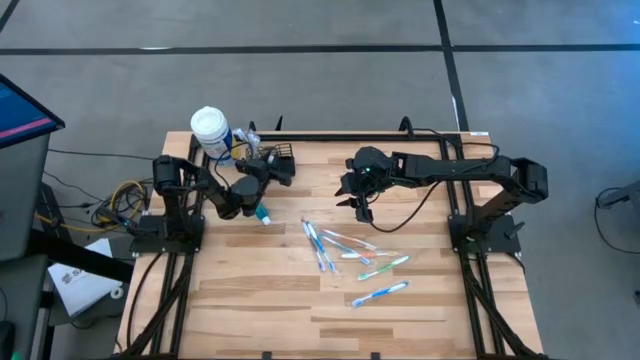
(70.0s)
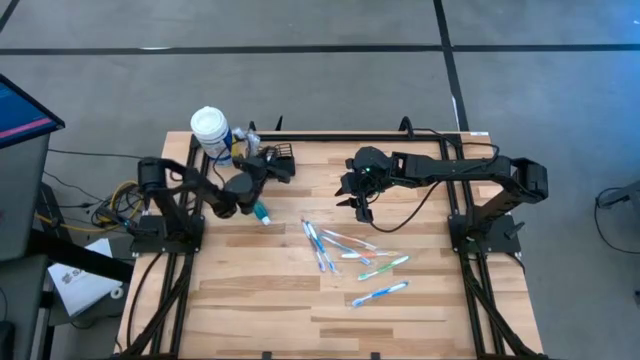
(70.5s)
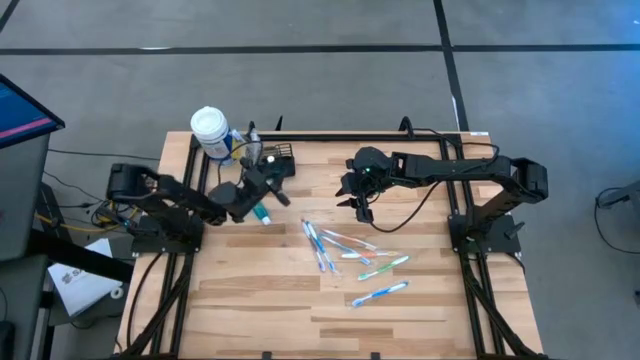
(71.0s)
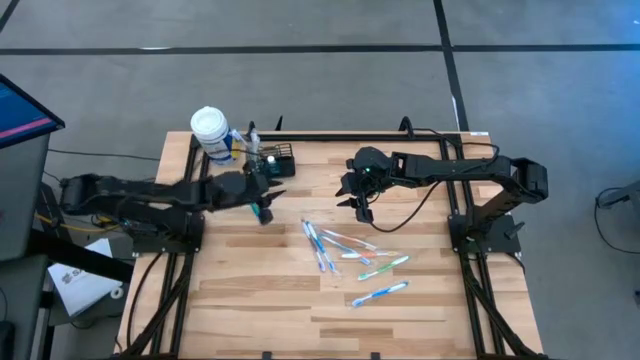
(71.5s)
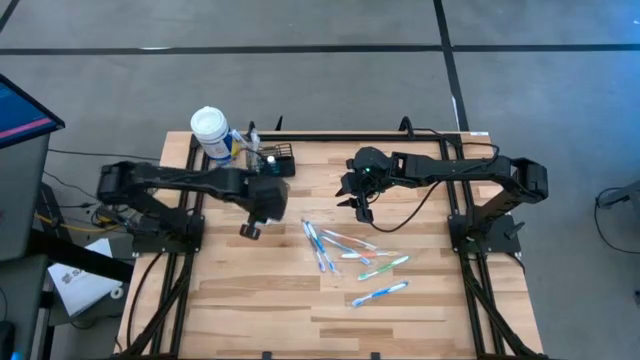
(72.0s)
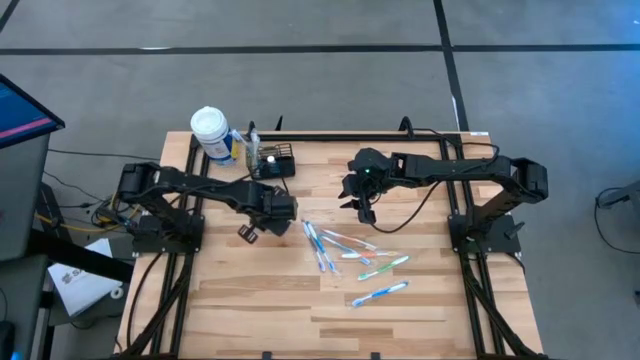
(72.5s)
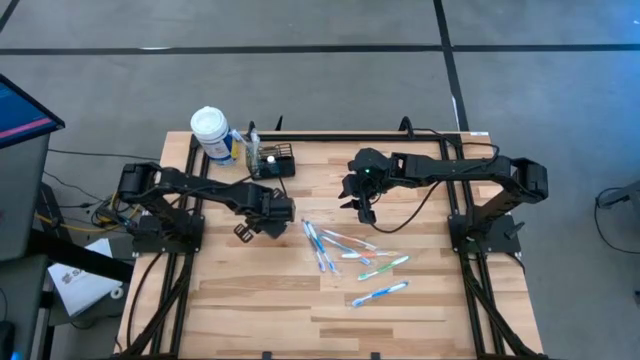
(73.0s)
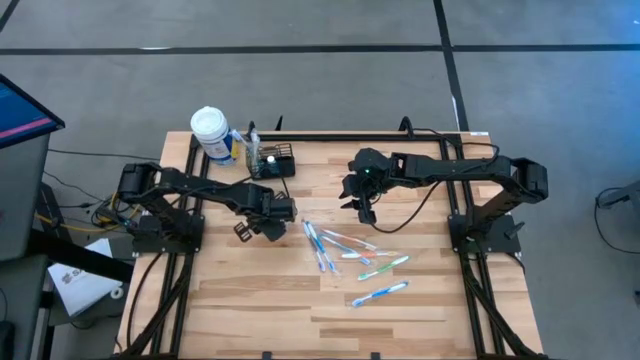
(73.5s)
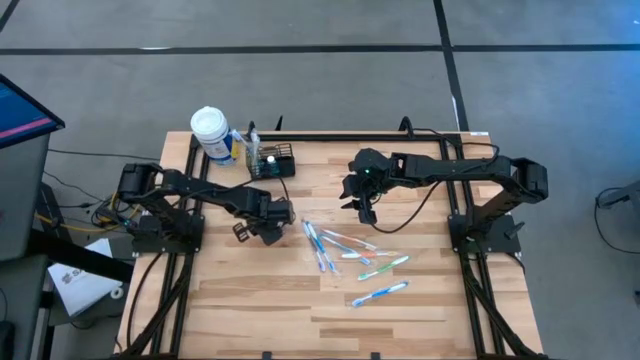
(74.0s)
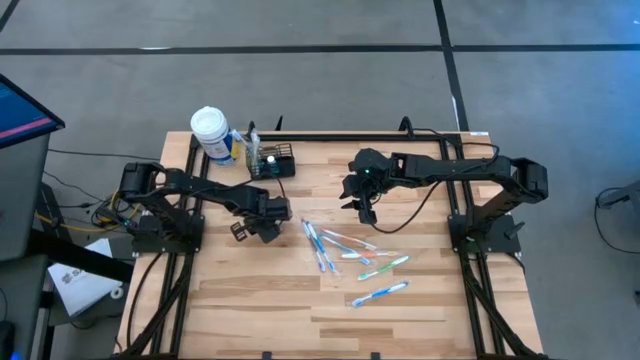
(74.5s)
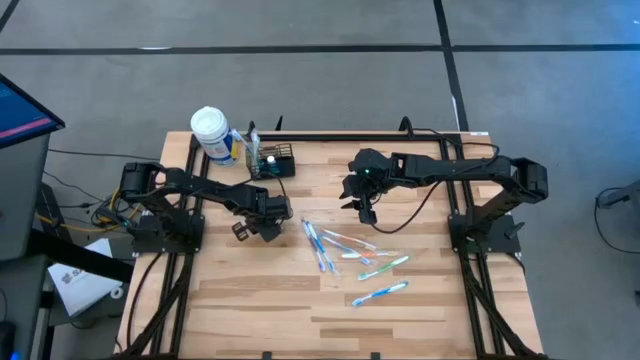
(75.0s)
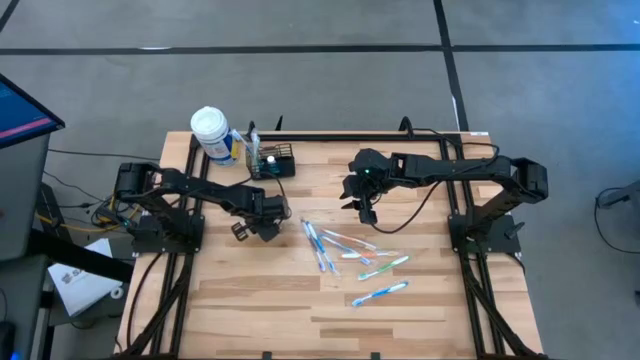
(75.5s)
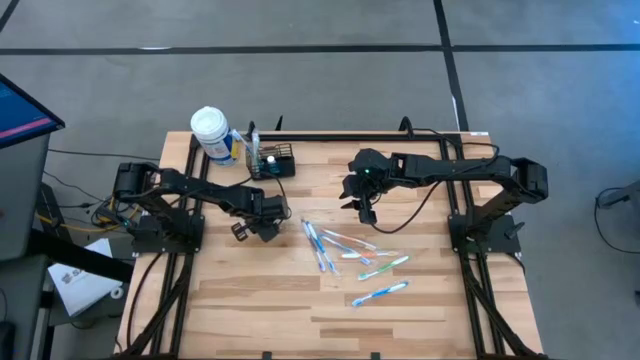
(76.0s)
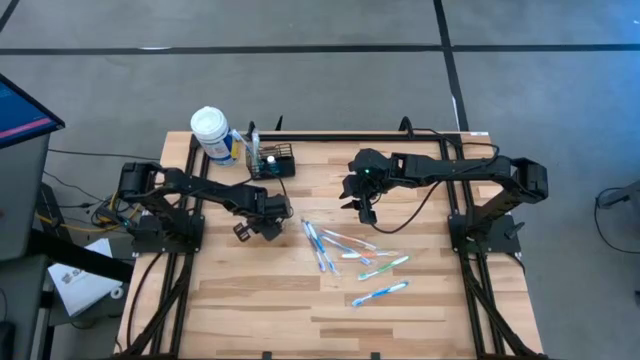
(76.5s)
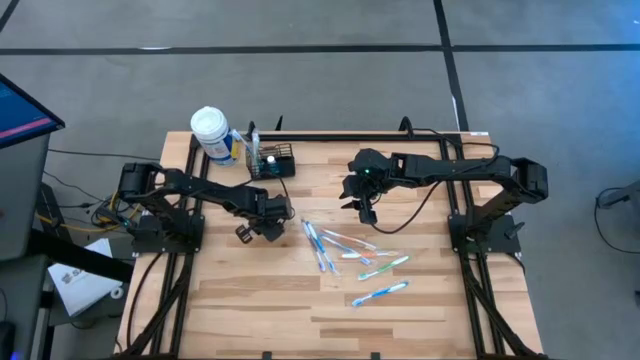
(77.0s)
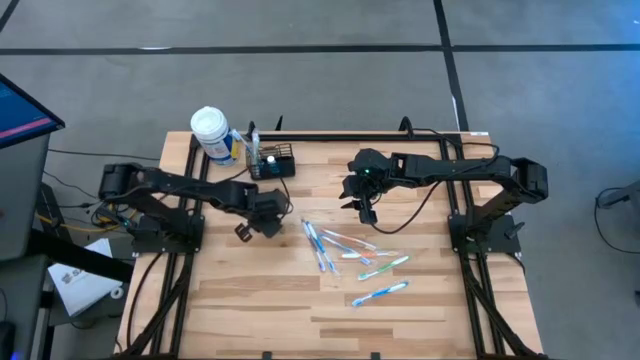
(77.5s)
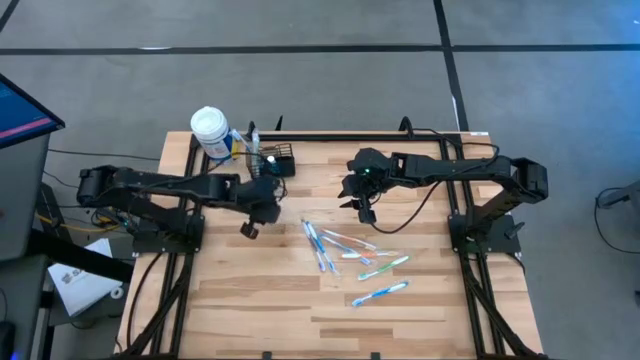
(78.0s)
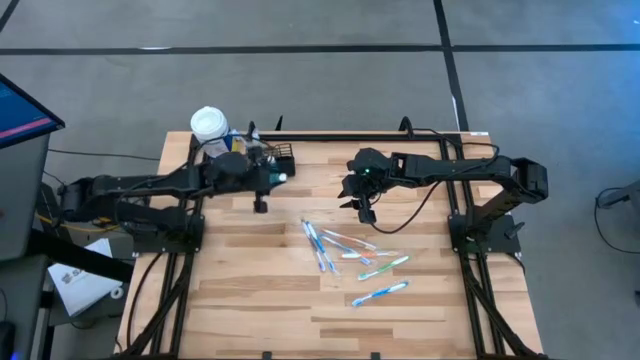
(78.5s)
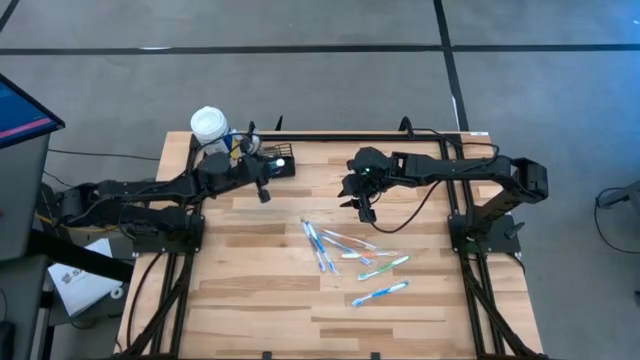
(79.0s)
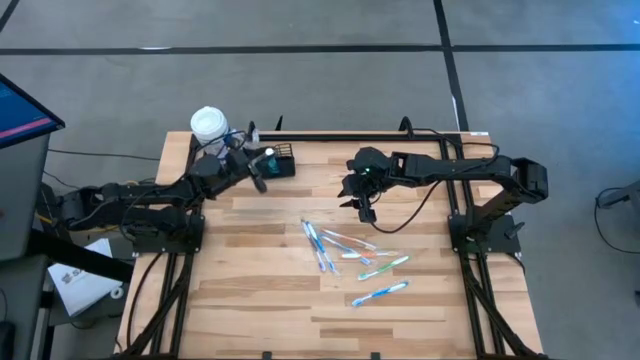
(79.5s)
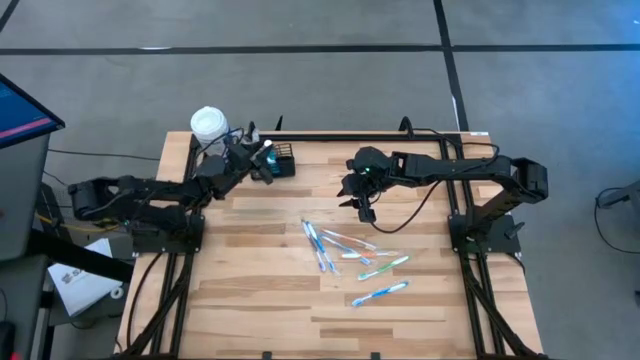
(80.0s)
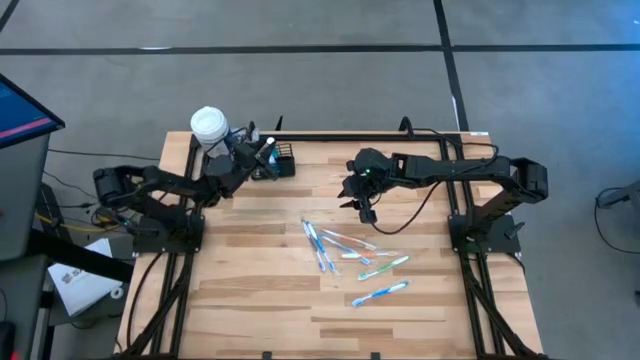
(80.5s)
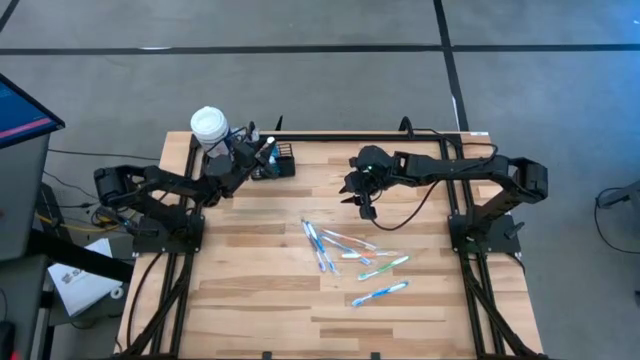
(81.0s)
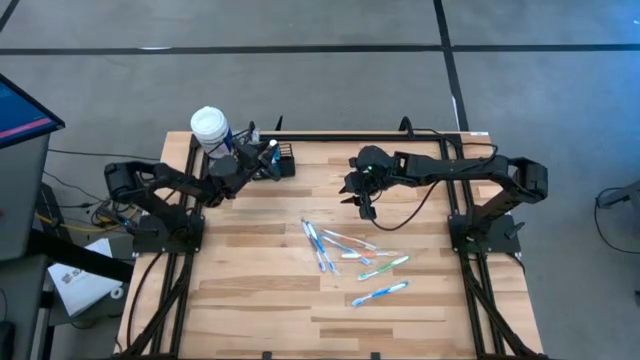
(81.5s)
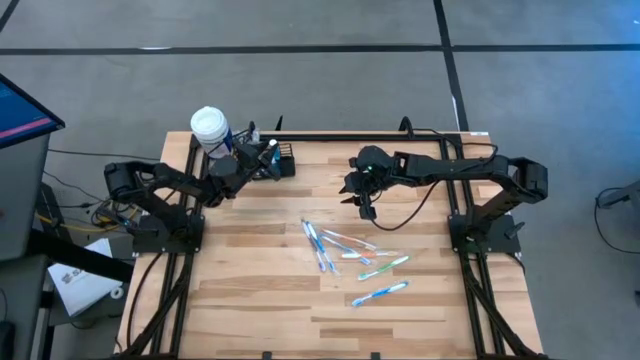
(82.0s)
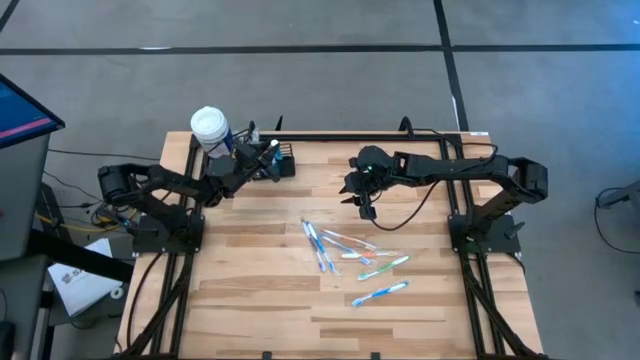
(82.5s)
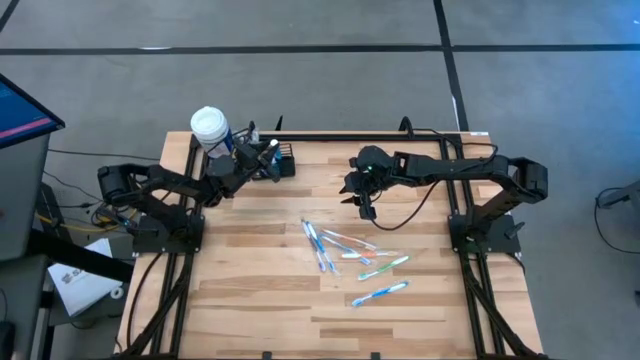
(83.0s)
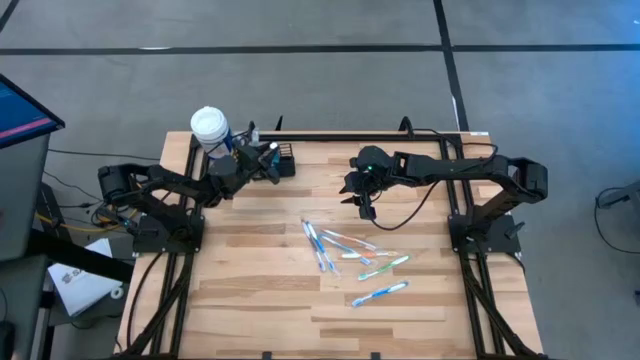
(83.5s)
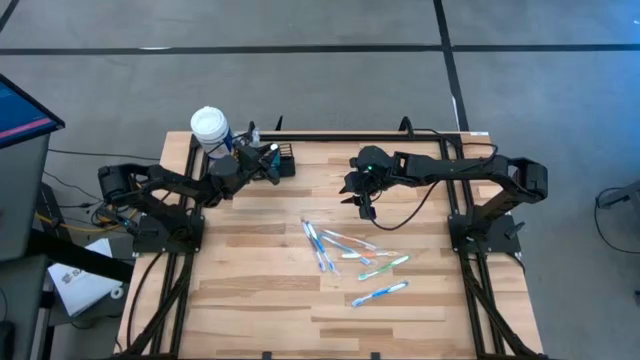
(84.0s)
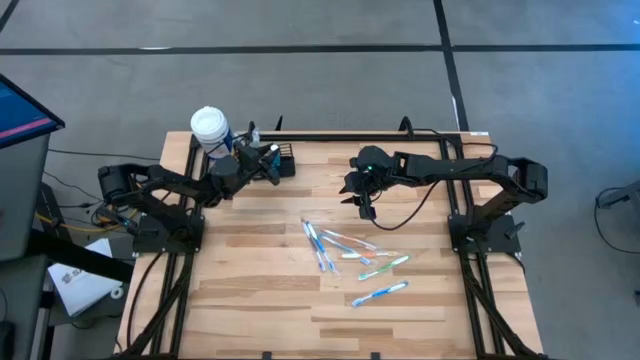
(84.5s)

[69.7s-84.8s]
Task: Pick & Place toothbrushing station
Put the blue mouthwash into the black wire organizer

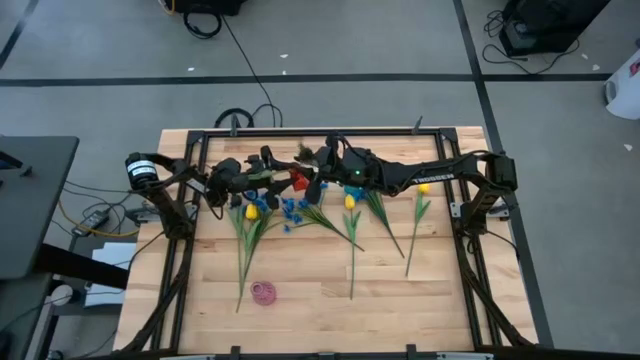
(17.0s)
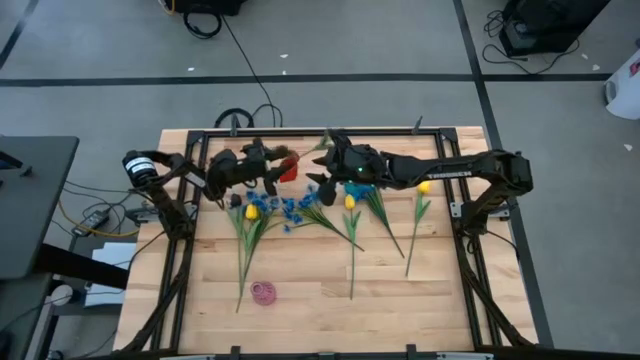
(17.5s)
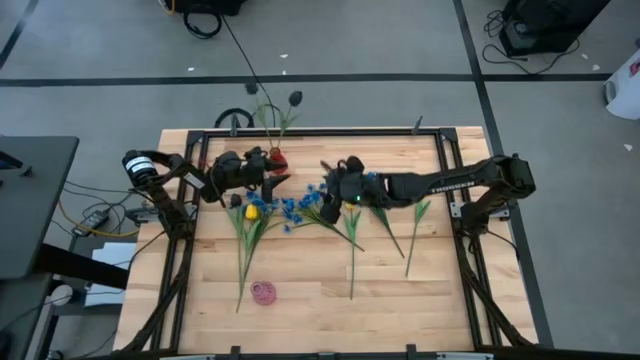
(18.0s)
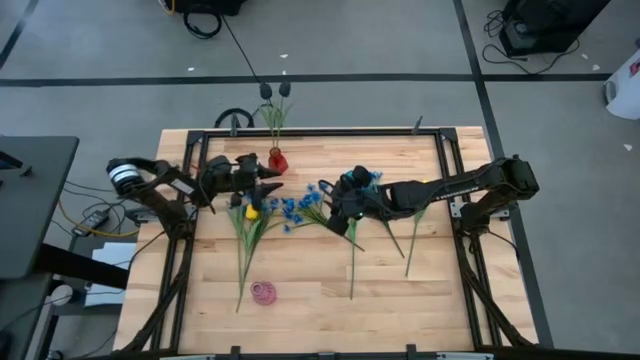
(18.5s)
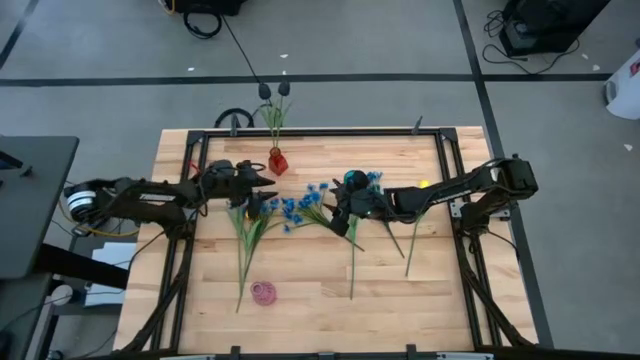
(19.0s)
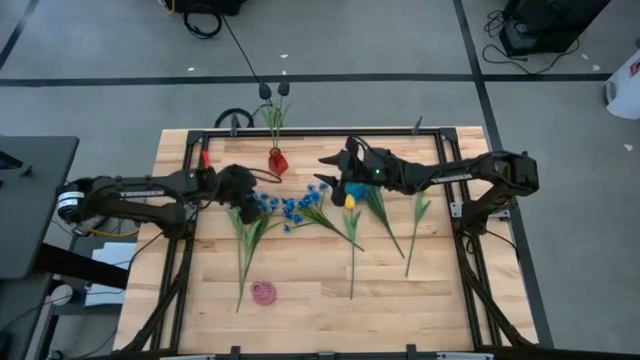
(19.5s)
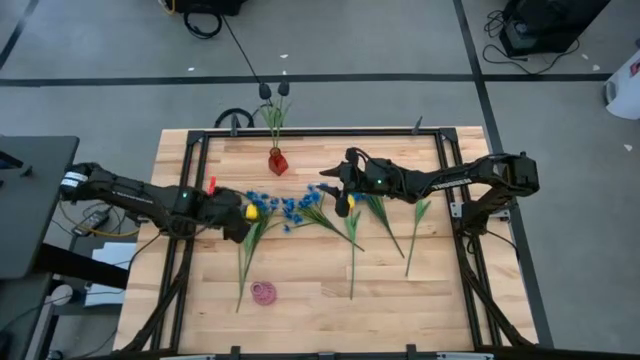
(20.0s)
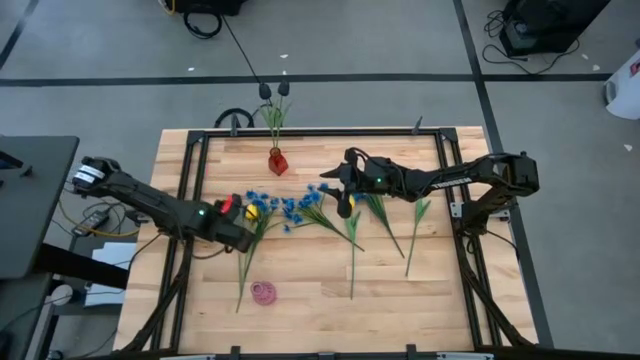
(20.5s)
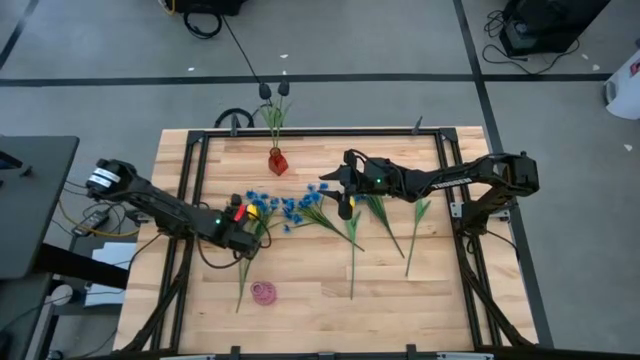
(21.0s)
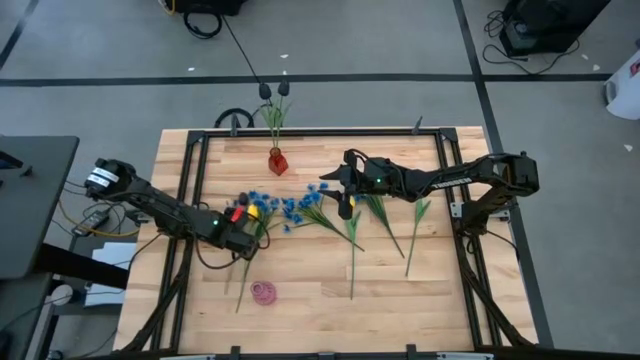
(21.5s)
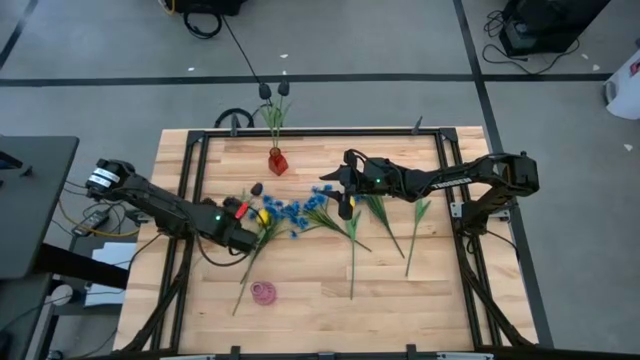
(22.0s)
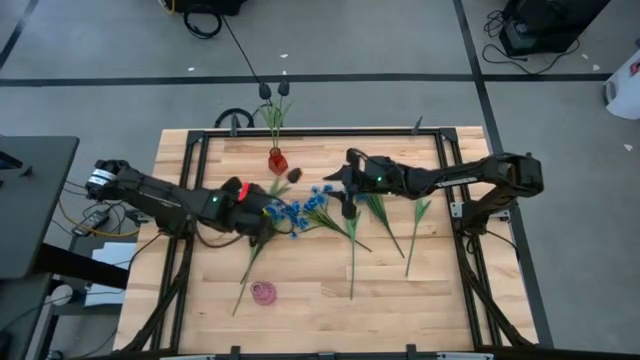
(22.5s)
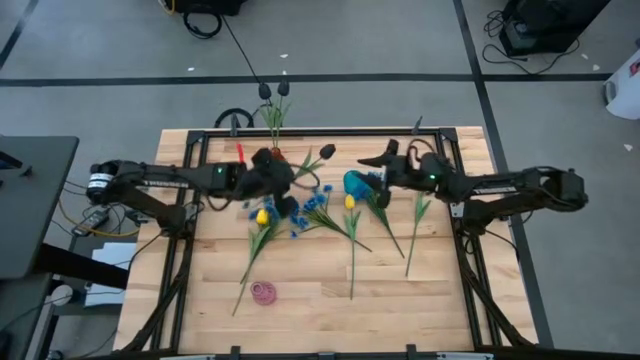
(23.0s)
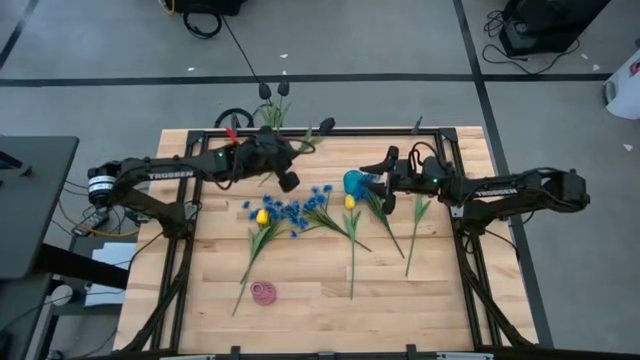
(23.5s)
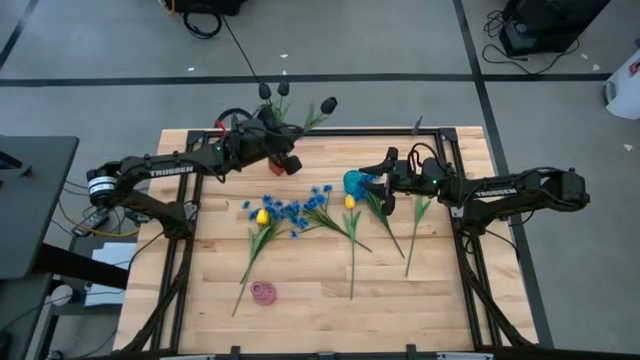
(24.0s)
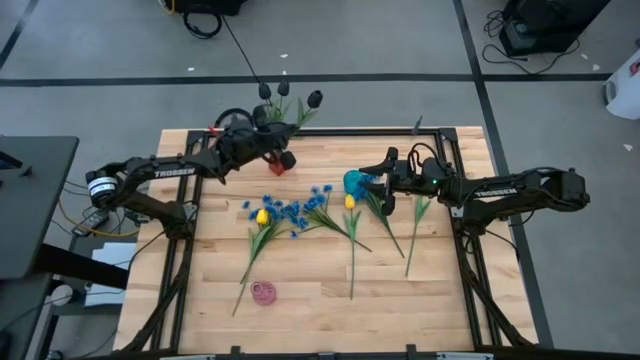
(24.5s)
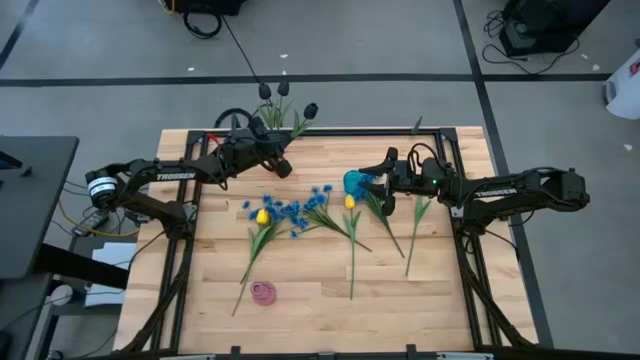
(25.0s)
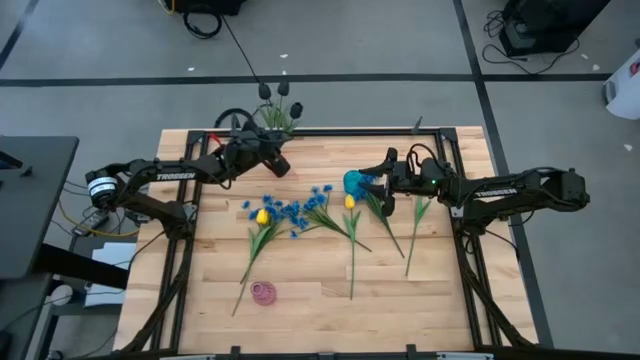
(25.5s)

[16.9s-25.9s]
Task: Sort flowers into vase by color
Put the black tulip into the red vase
